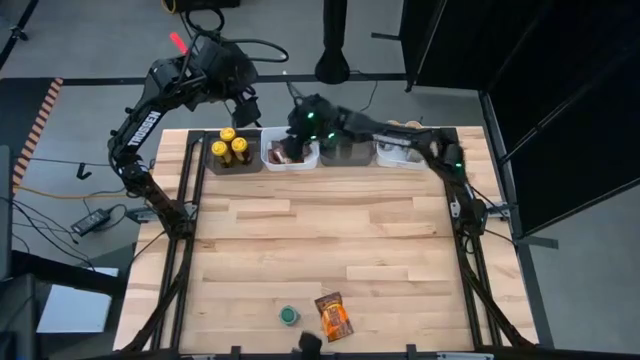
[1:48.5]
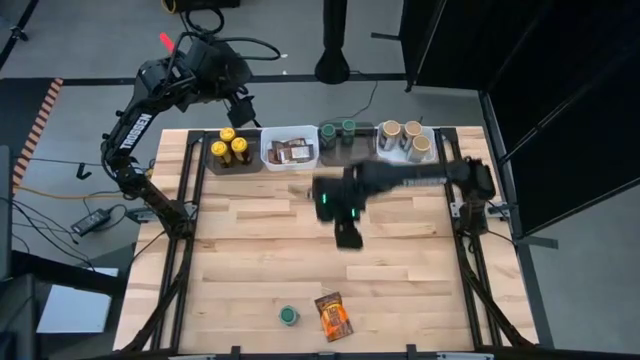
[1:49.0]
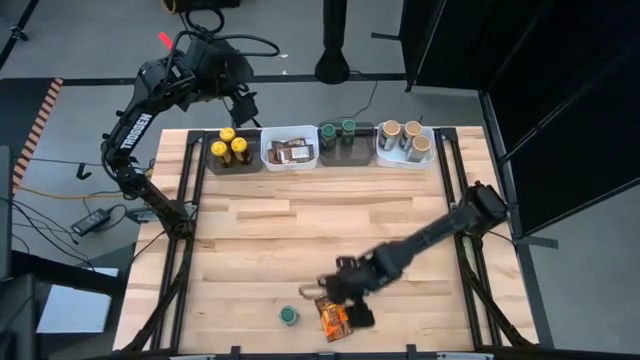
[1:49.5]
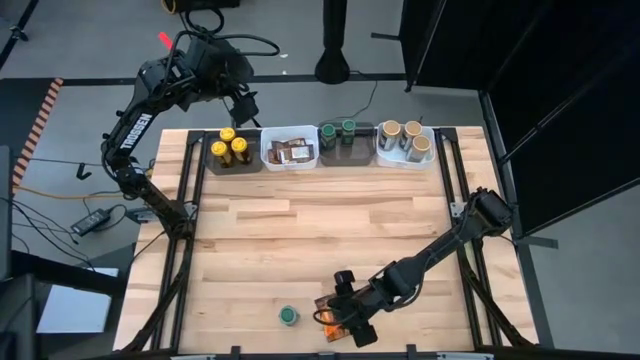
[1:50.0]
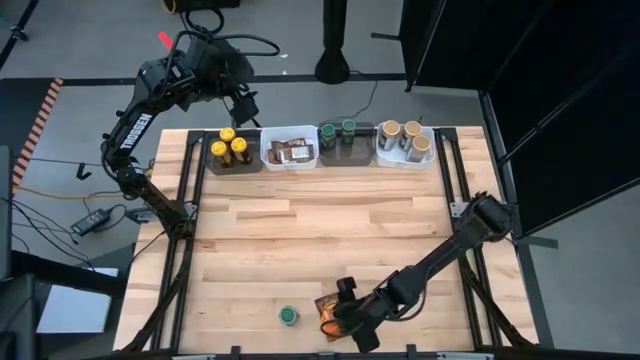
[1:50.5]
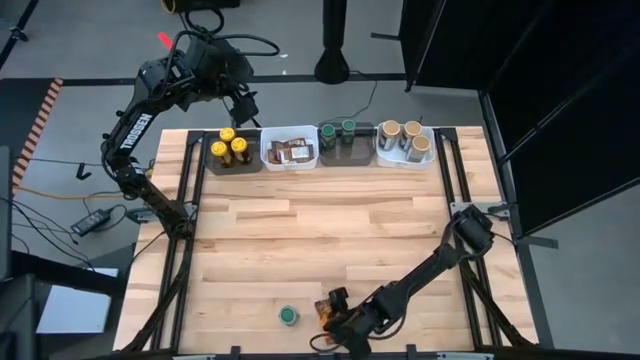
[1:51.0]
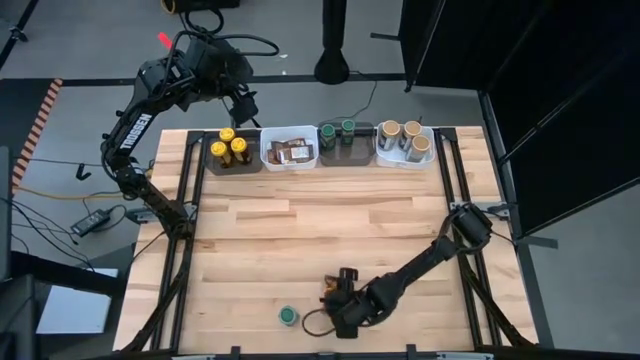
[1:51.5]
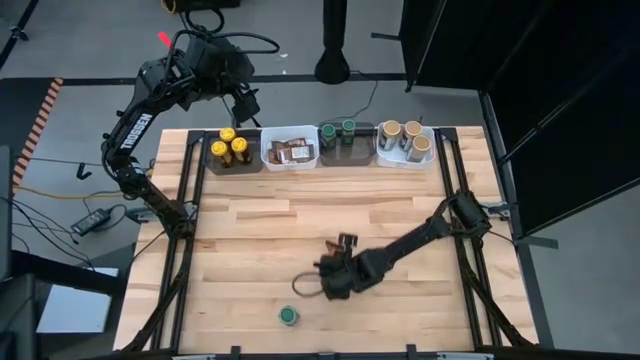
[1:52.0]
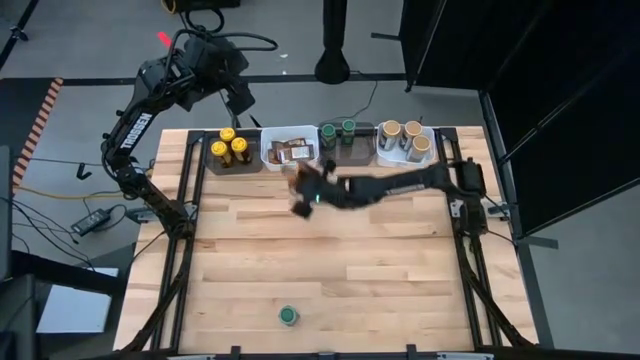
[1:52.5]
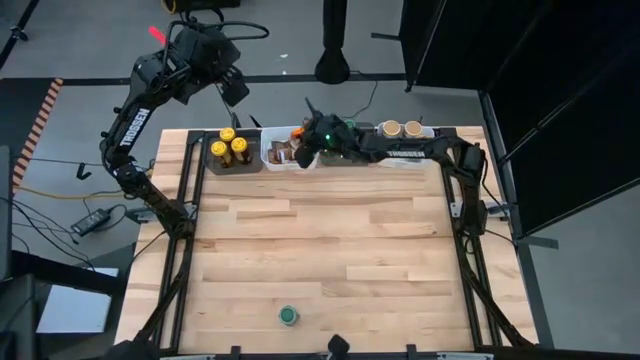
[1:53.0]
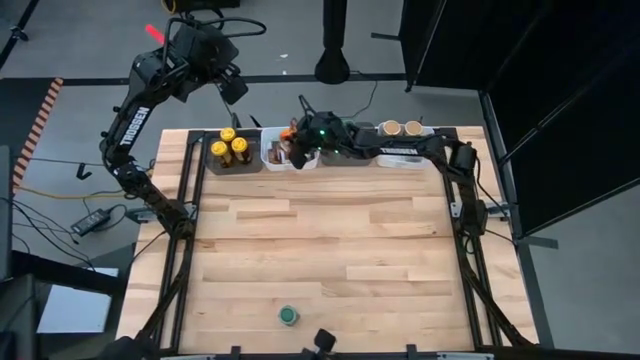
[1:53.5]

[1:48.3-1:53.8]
Task: Sort spices by type
Put the orange seasoning pack into the left white bin

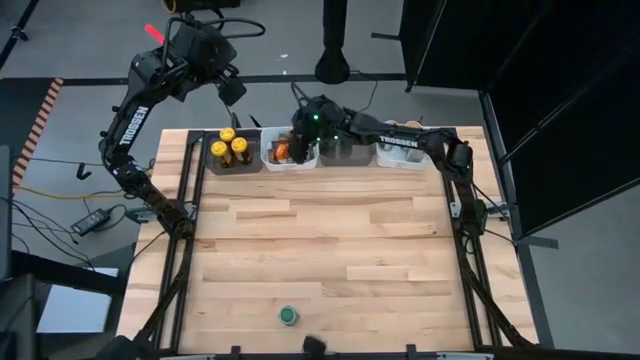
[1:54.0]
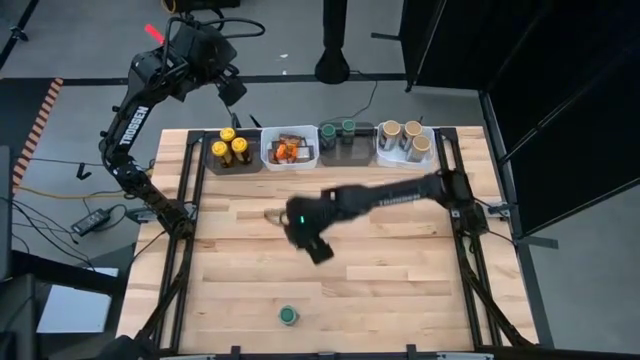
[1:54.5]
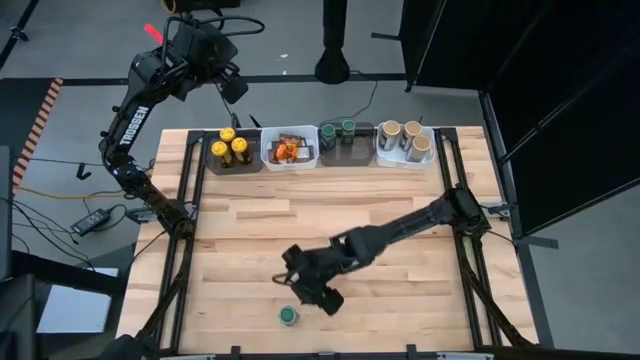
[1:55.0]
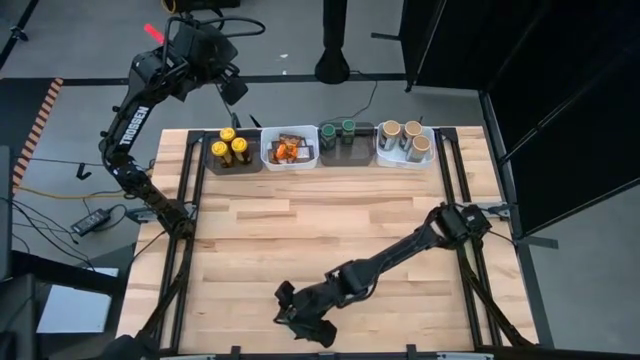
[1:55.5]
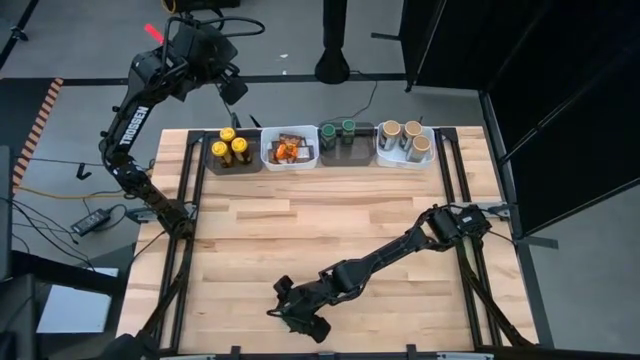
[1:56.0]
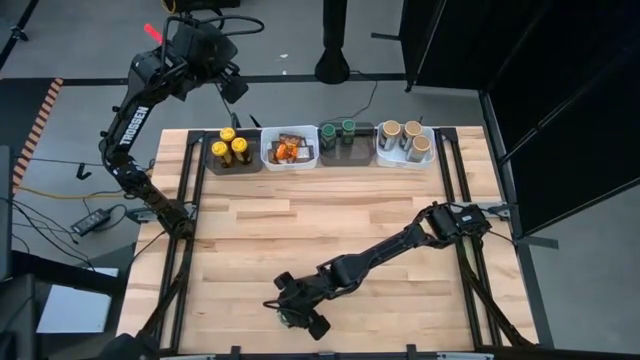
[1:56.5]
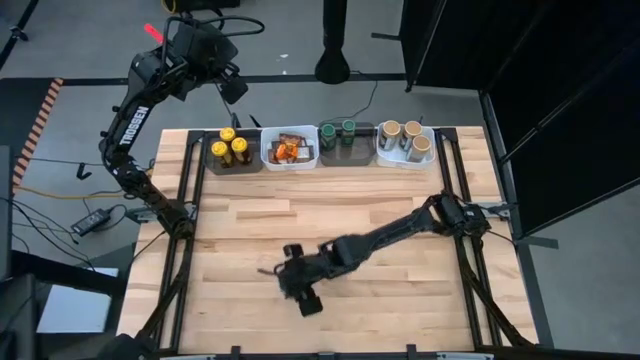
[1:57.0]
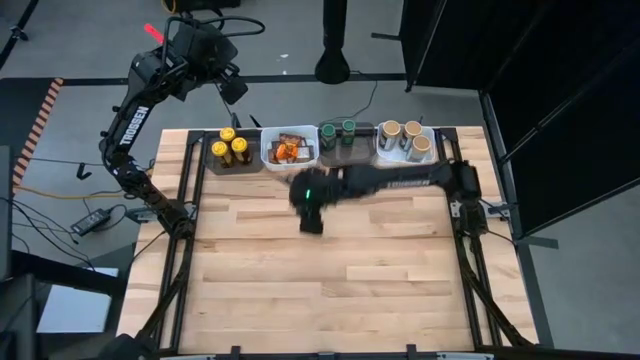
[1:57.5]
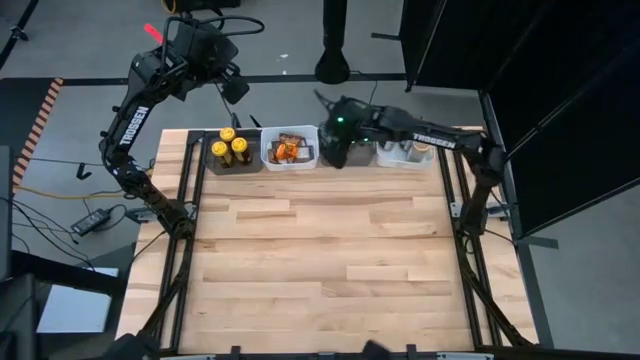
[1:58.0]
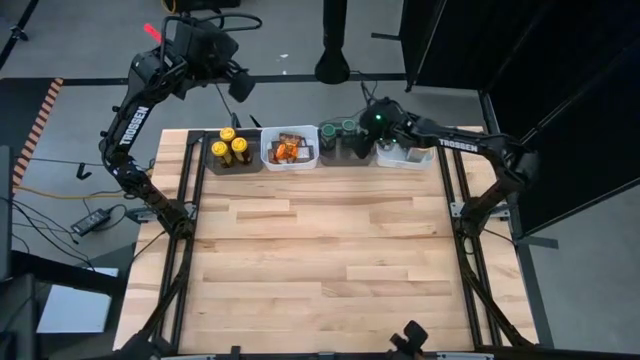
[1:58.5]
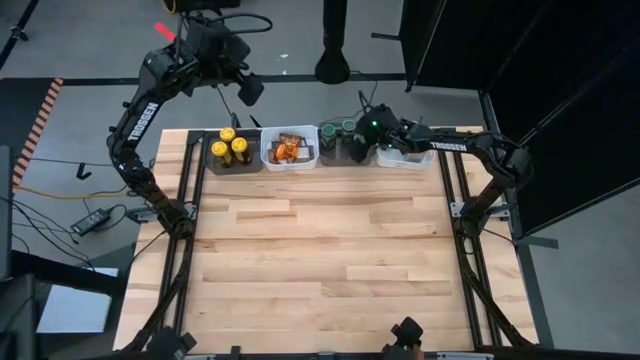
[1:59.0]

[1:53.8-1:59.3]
Put the green seasoning bottle into the right black bin

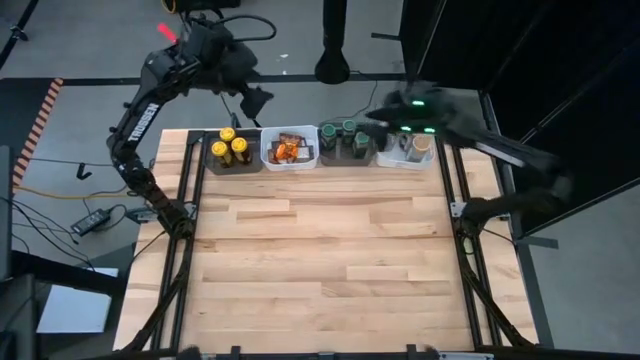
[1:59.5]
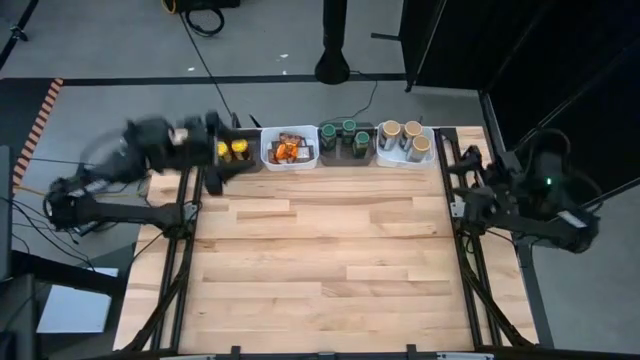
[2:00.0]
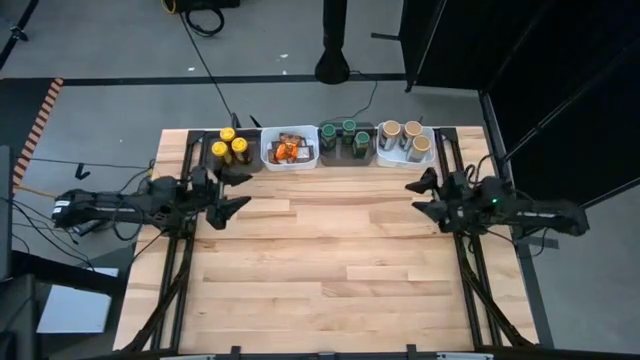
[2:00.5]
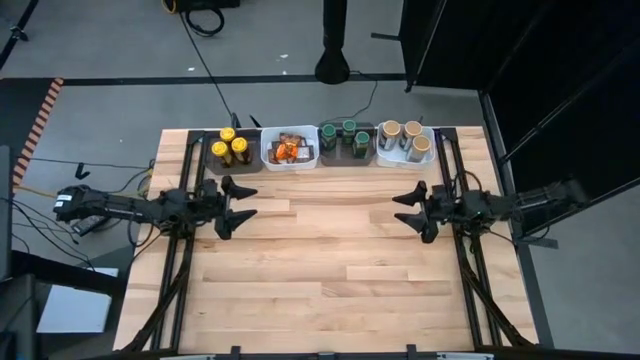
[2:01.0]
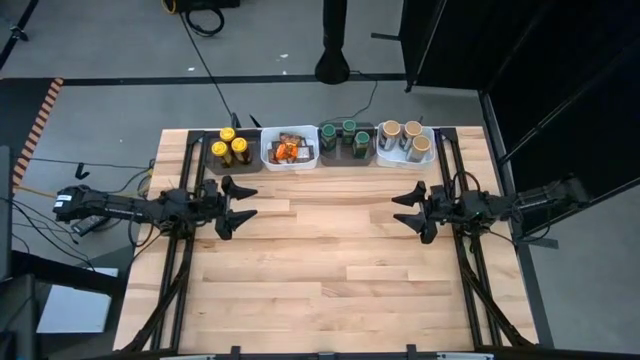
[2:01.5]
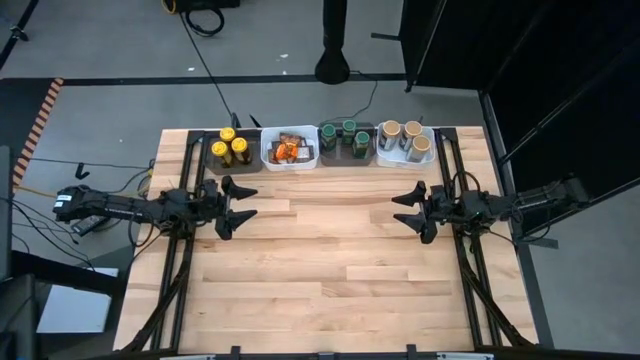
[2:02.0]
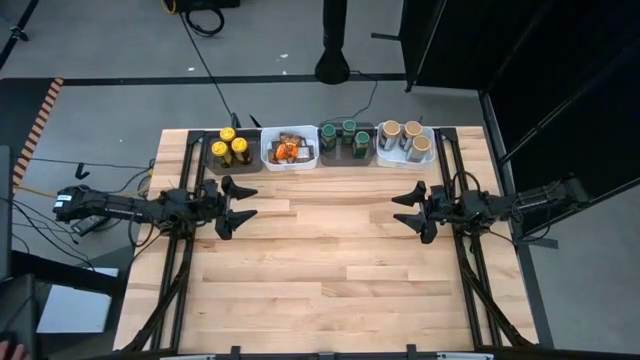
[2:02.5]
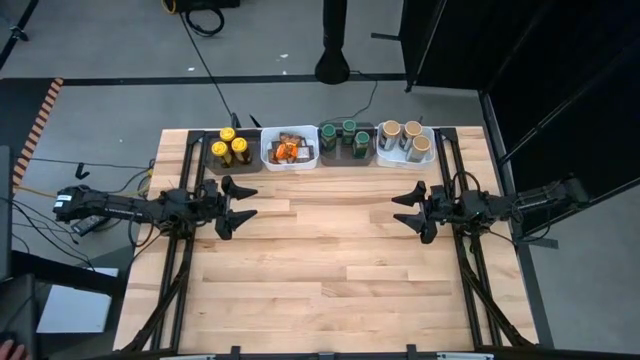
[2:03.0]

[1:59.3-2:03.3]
Return to Home Position

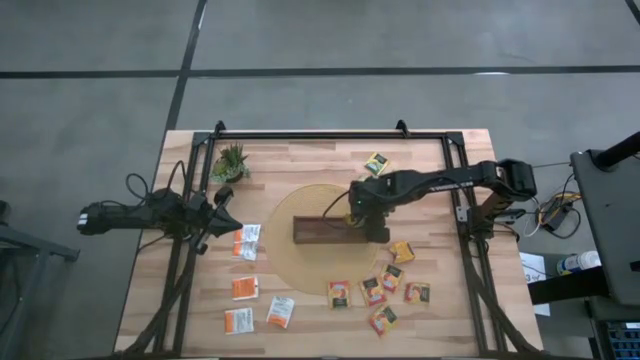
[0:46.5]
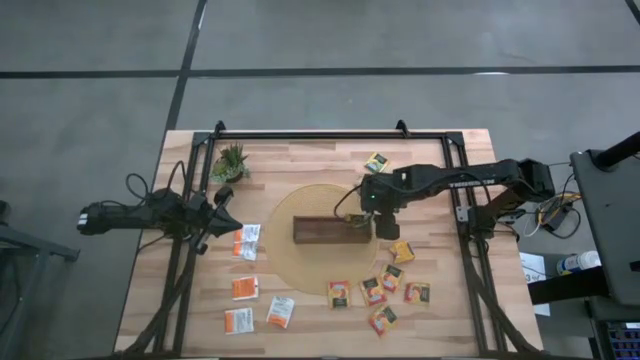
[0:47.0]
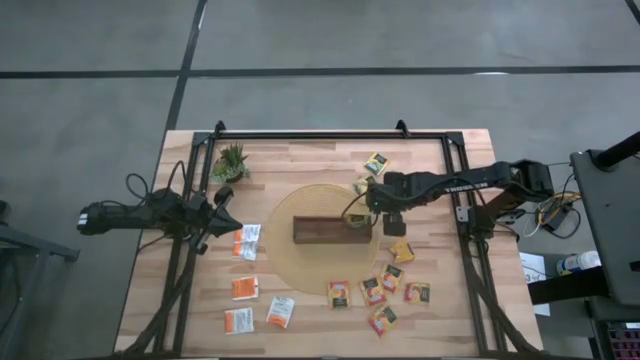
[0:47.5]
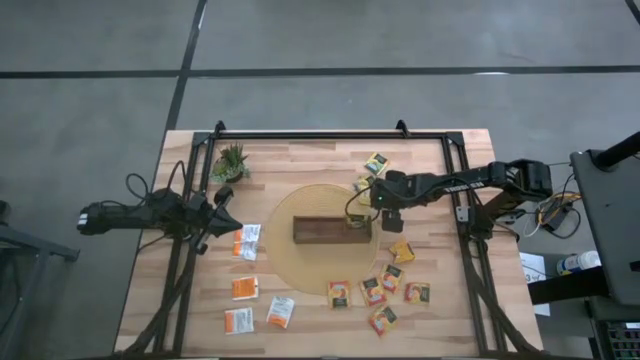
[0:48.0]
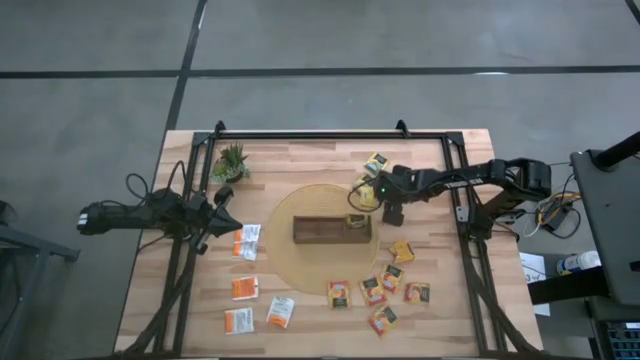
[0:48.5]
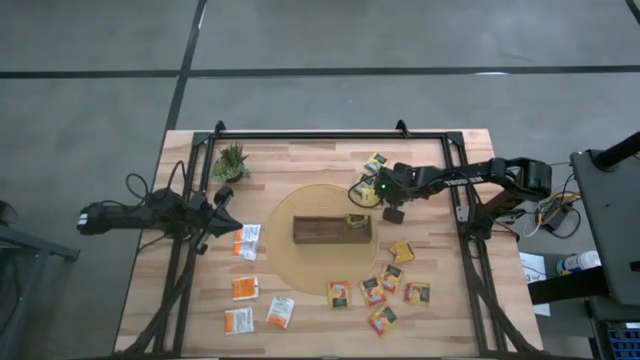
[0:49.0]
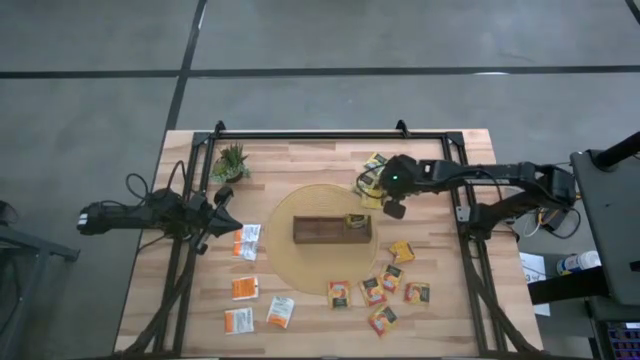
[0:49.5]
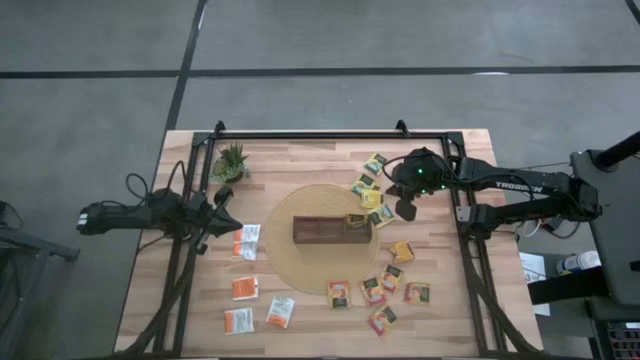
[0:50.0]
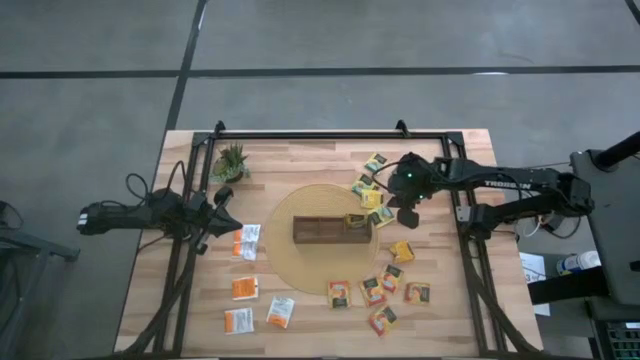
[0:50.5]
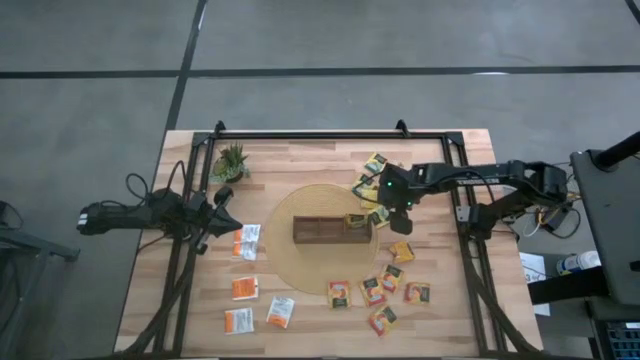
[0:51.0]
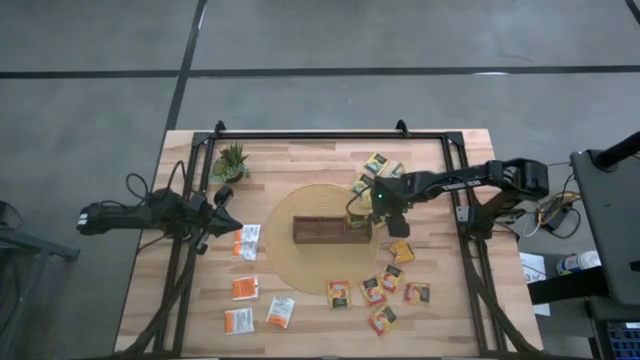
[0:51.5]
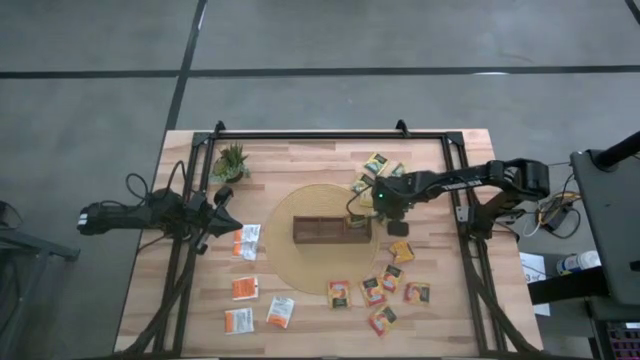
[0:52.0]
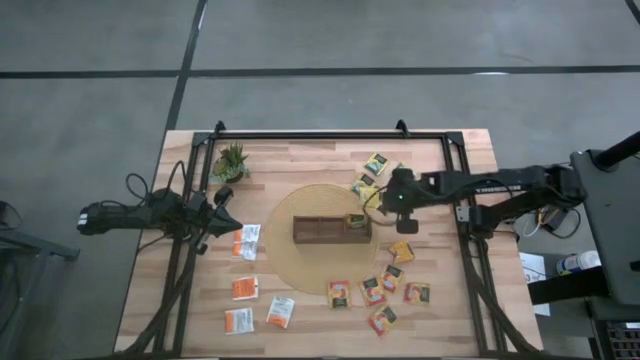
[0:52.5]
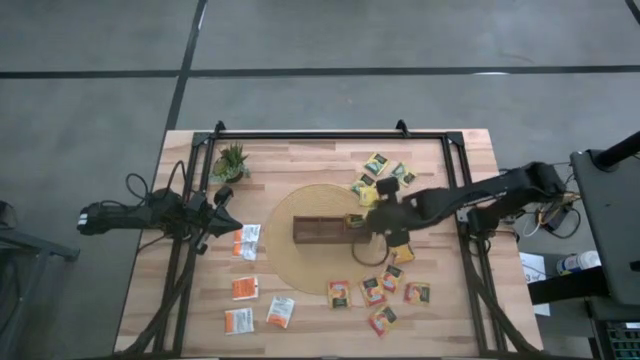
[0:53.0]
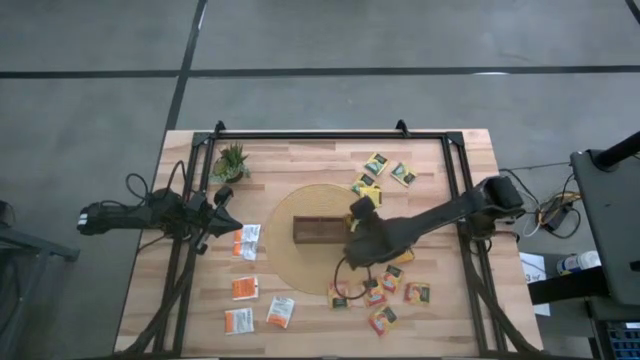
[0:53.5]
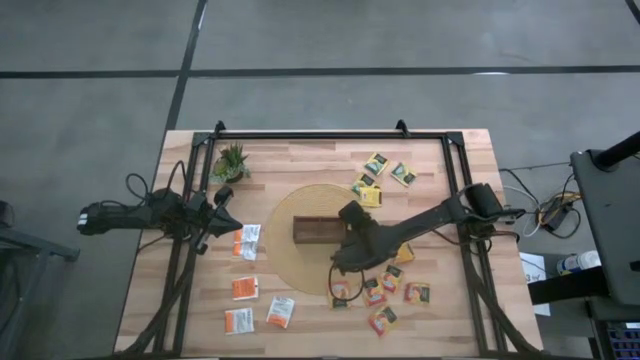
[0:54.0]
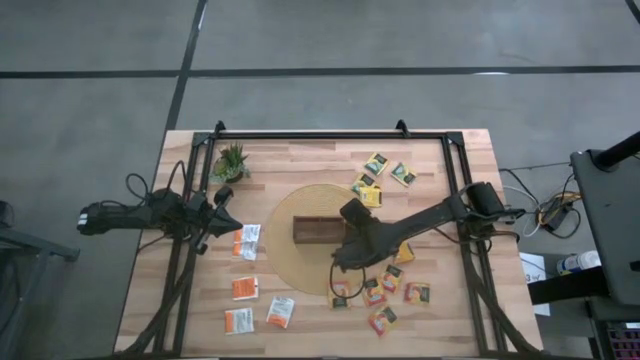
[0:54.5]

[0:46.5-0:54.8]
Task: Pick & Place Tea
Put the yellow tea bag into the right of the wooden organizer
